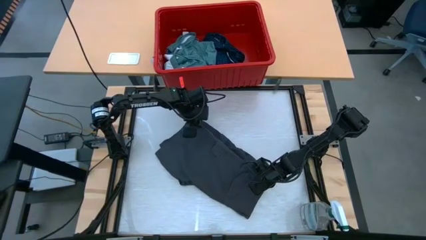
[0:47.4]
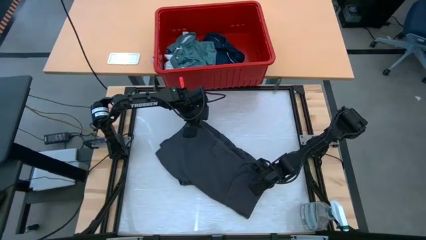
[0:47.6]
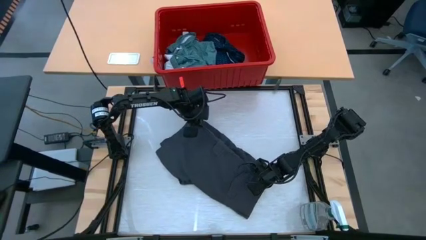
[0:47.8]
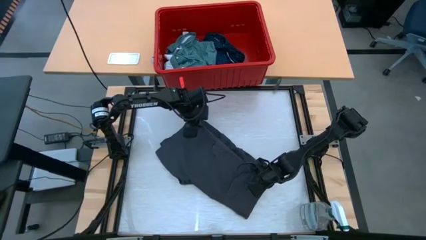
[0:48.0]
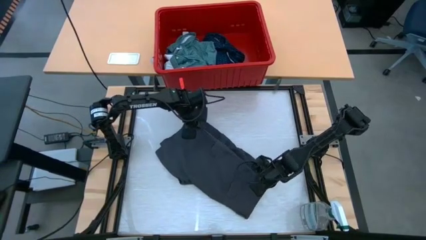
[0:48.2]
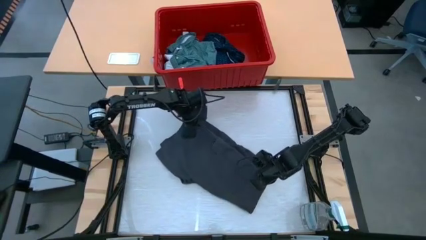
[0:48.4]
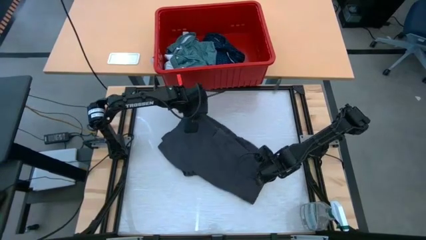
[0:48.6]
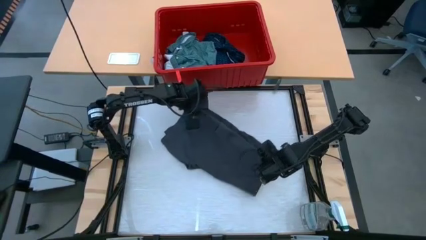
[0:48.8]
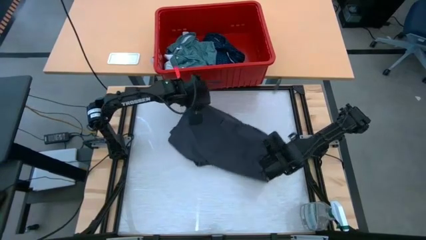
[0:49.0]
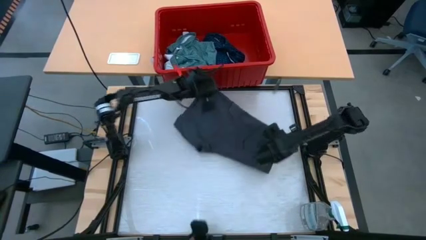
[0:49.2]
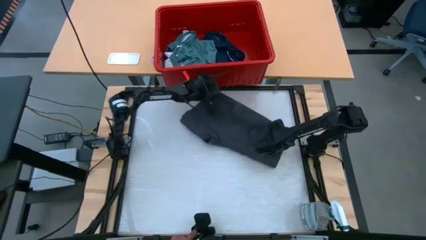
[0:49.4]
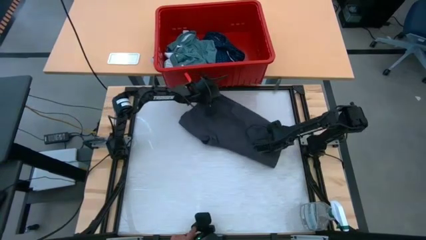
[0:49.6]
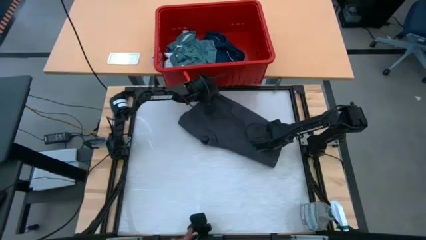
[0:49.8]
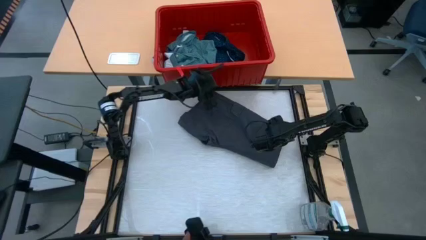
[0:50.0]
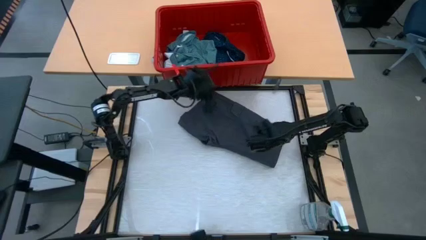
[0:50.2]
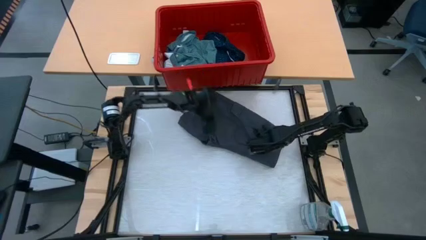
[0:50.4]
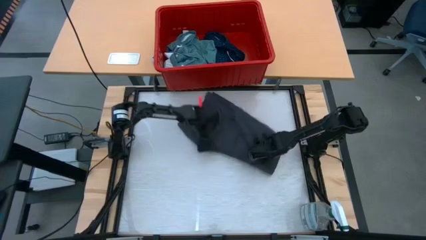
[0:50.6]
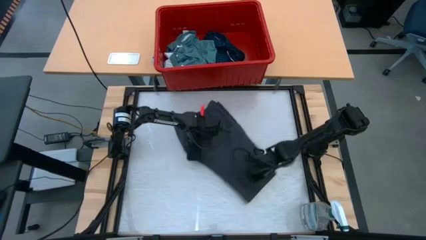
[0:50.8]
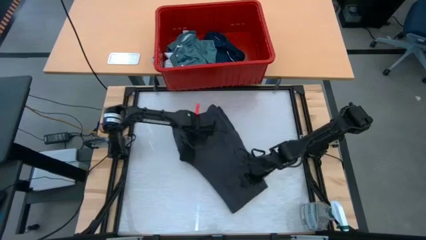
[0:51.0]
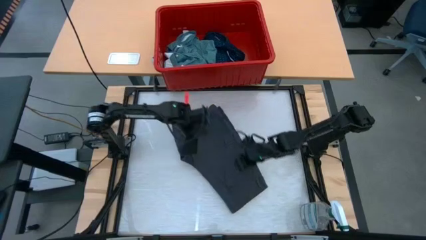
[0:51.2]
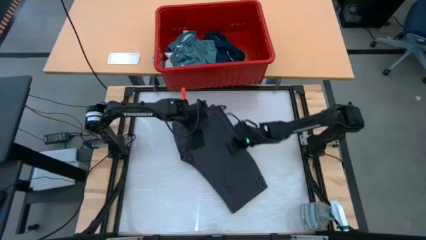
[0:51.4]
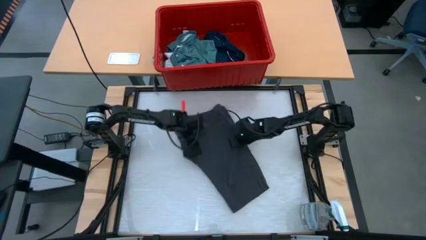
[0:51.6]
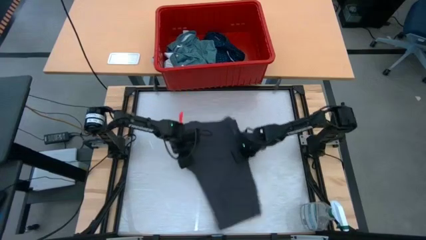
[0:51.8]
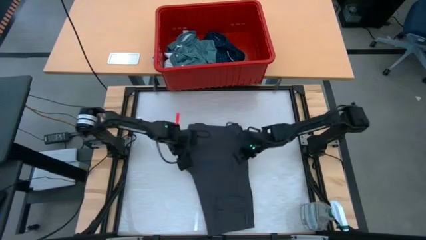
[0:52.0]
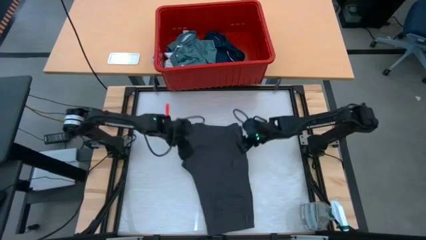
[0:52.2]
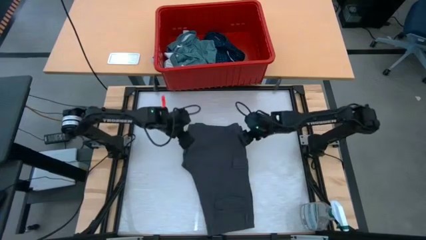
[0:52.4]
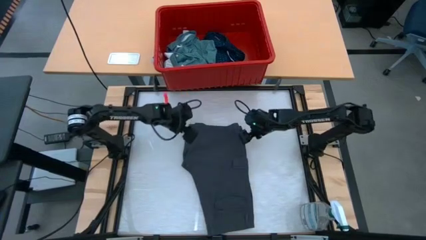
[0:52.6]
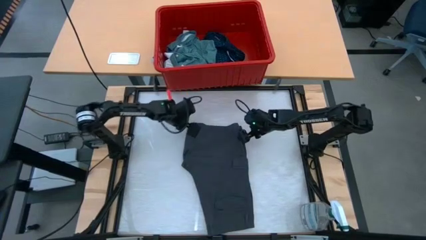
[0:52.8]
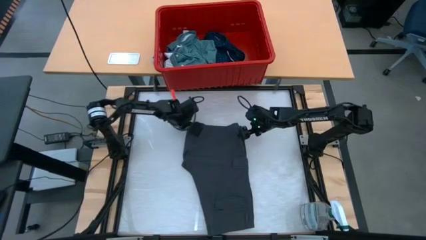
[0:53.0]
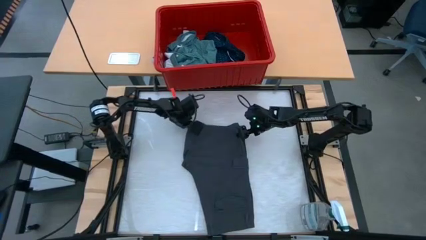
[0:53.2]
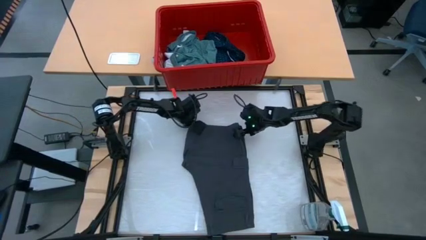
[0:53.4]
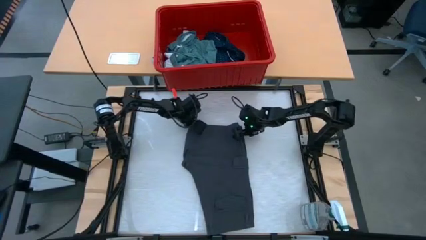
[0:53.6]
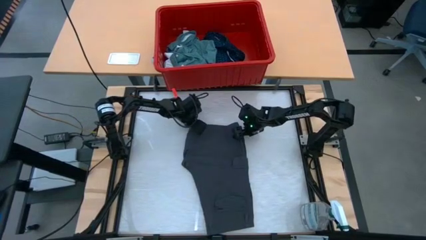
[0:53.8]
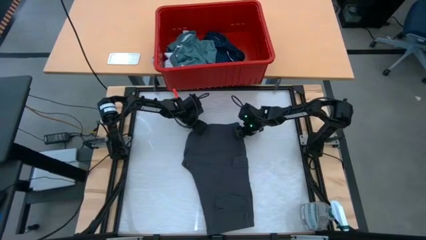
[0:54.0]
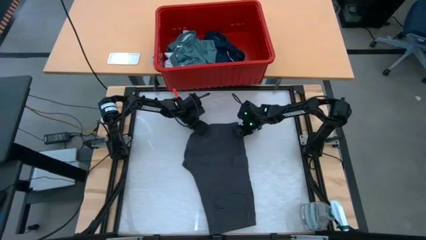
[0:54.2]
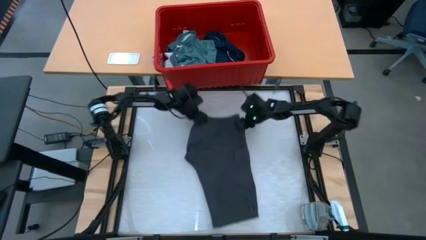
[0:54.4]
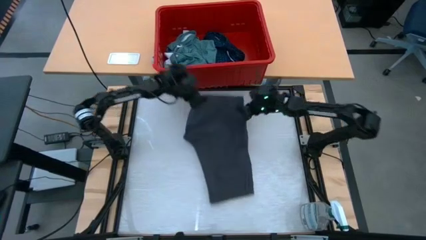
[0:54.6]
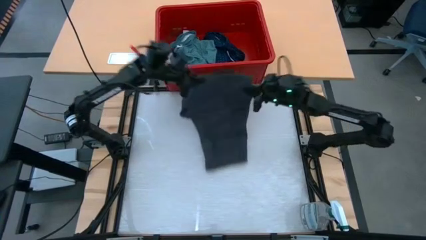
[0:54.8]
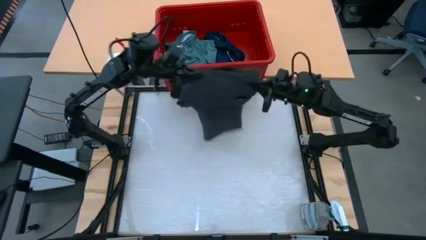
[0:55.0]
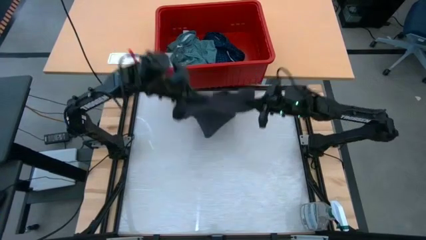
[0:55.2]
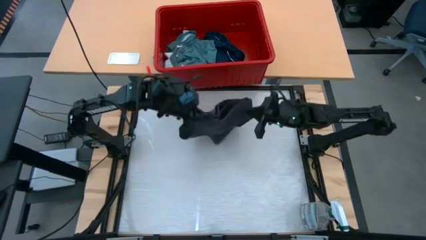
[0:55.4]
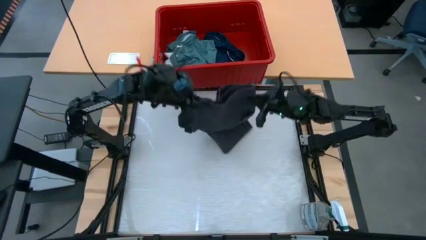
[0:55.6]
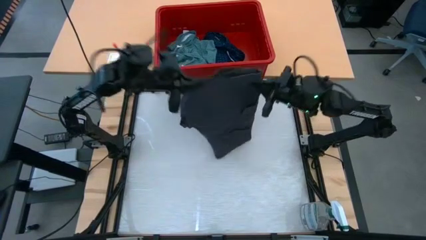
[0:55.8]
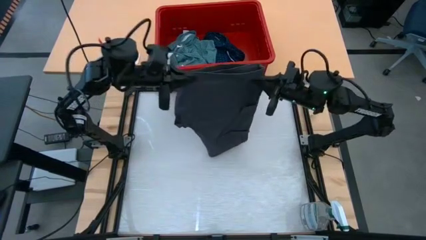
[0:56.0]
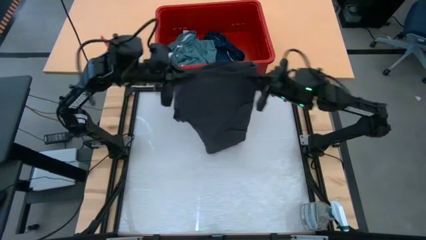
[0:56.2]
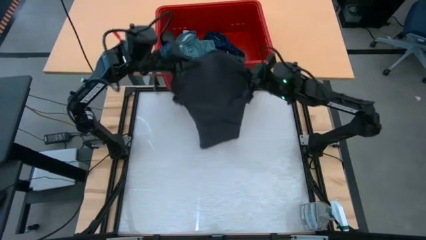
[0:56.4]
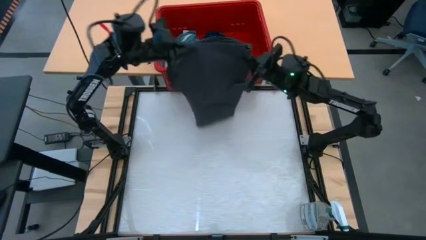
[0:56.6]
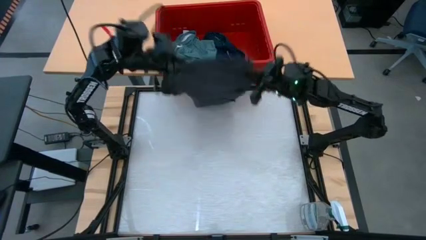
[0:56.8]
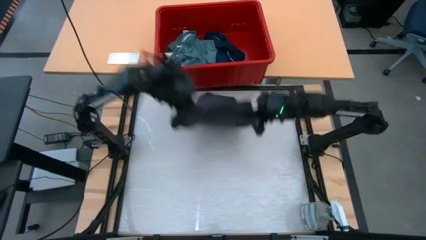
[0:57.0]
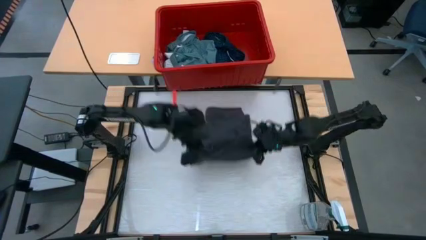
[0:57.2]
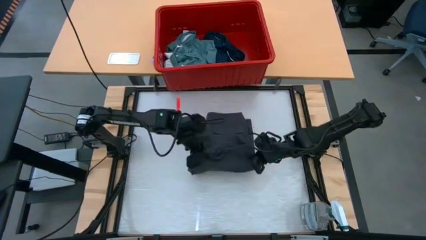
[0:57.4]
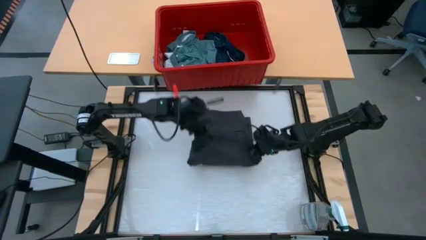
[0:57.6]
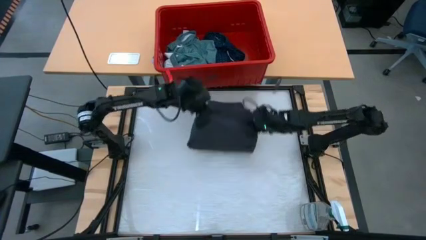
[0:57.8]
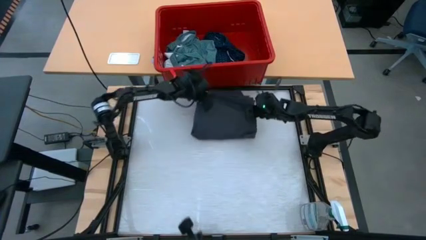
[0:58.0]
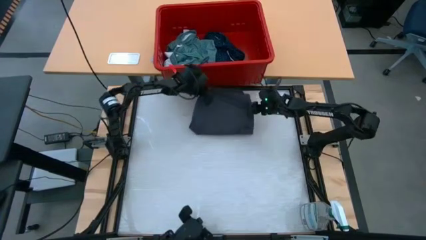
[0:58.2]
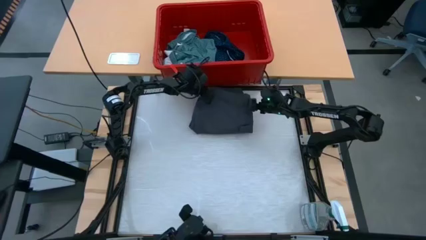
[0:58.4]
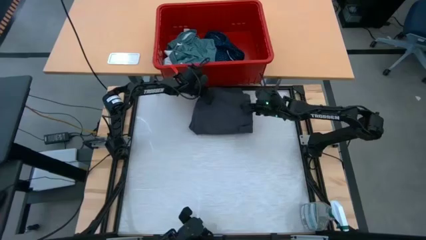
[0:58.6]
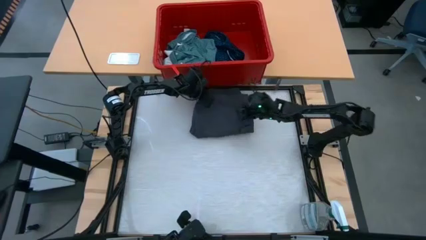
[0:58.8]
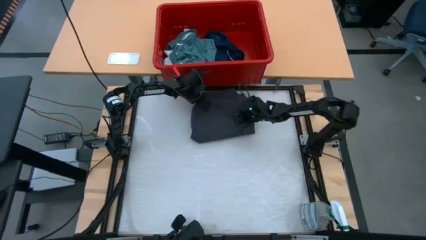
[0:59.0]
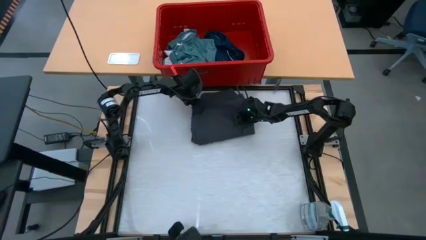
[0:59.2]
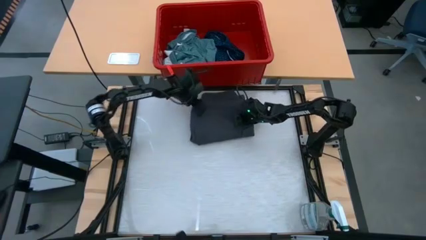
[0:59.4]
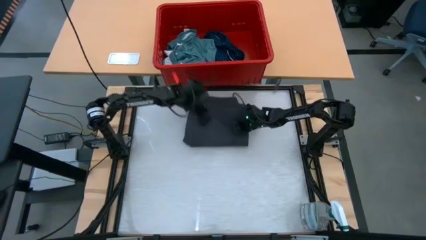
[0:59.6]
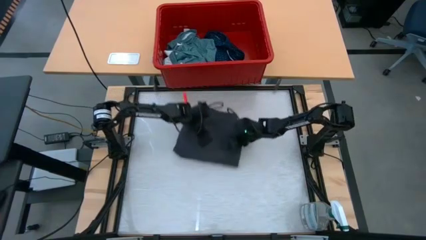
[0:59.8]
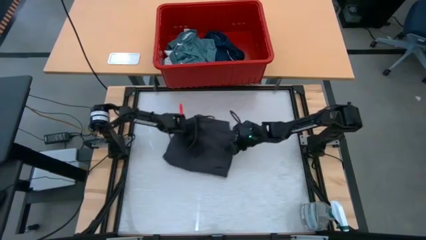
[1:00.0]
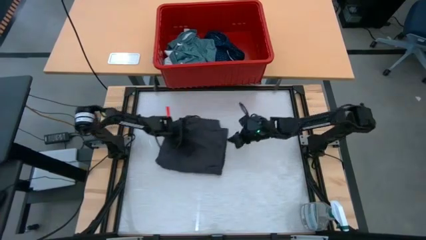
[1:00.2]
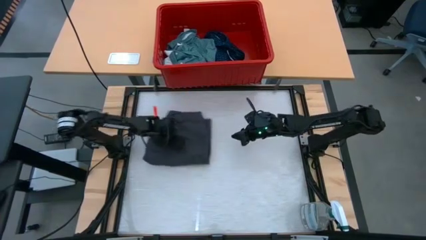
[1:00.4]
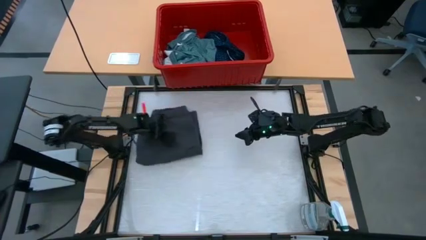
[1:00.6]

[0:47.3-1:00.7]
Task: Fold laundry
Fold the black pants

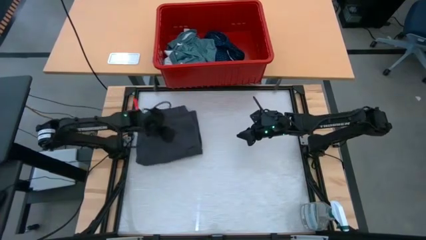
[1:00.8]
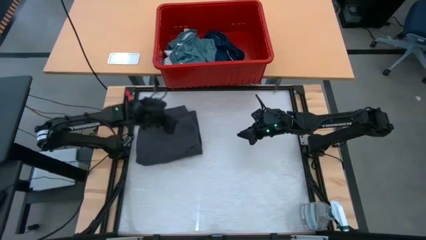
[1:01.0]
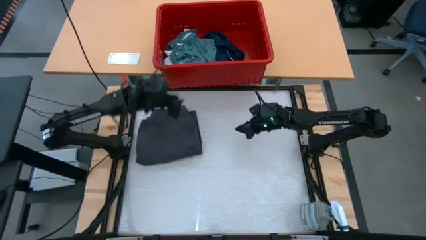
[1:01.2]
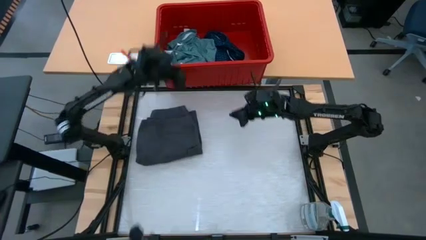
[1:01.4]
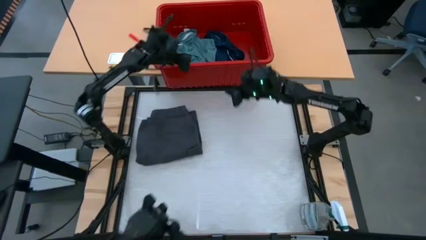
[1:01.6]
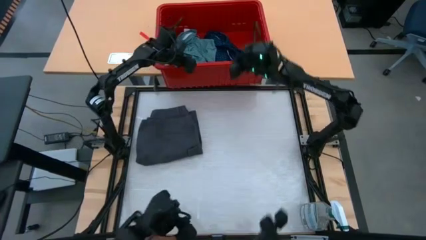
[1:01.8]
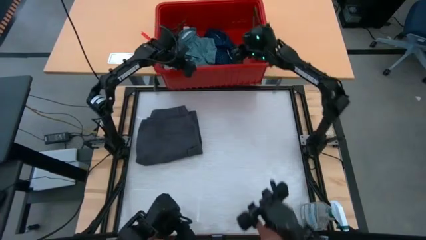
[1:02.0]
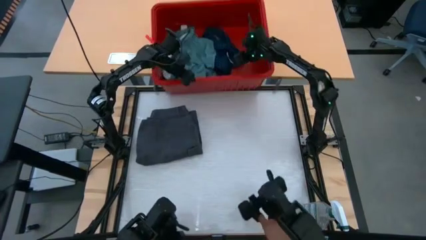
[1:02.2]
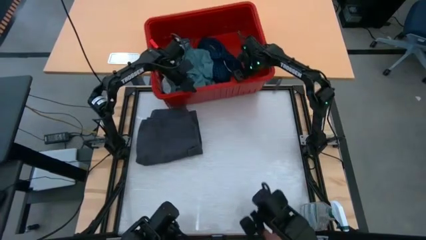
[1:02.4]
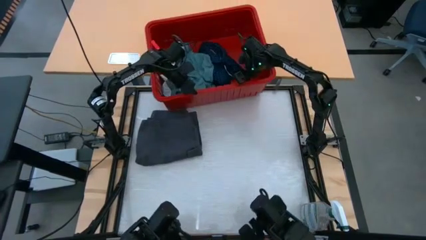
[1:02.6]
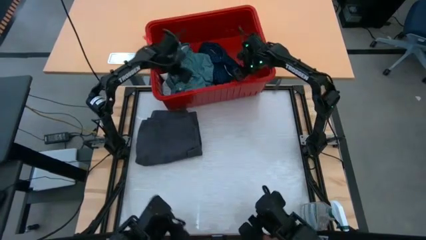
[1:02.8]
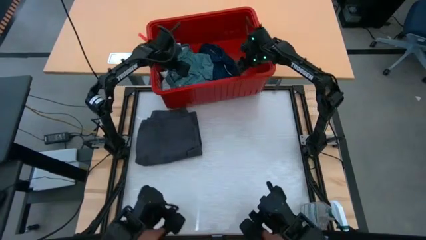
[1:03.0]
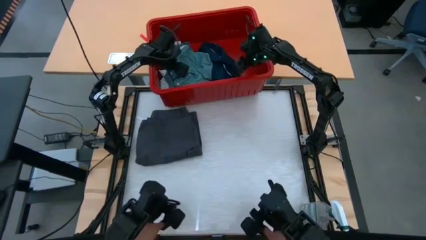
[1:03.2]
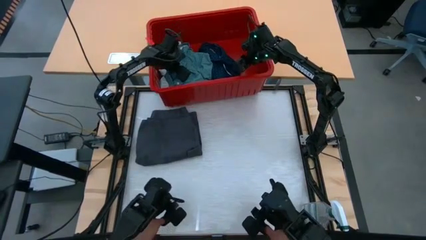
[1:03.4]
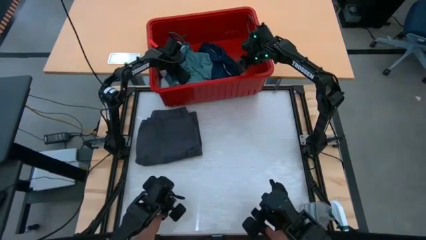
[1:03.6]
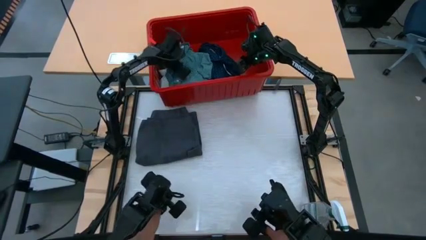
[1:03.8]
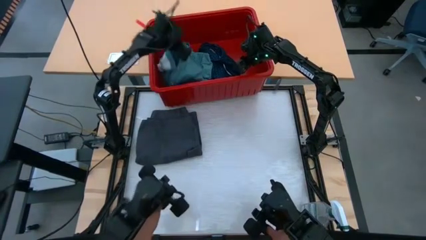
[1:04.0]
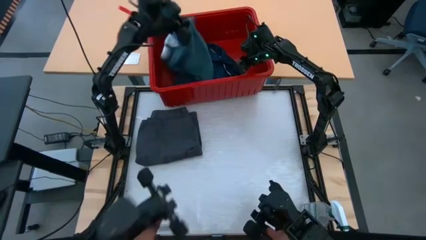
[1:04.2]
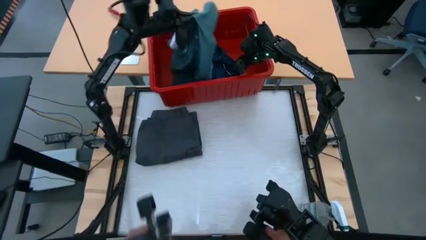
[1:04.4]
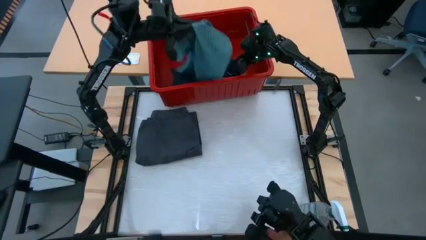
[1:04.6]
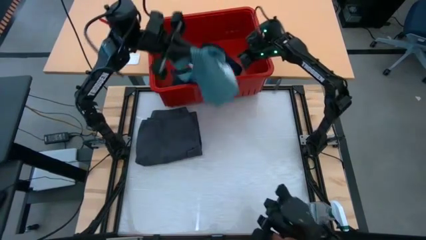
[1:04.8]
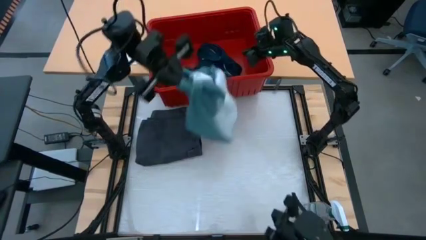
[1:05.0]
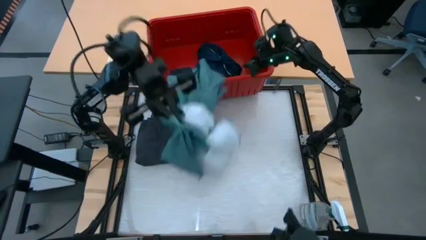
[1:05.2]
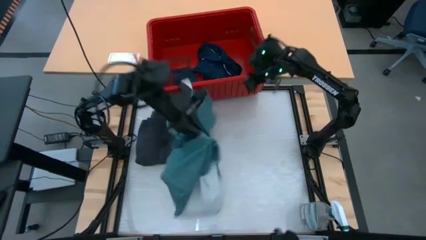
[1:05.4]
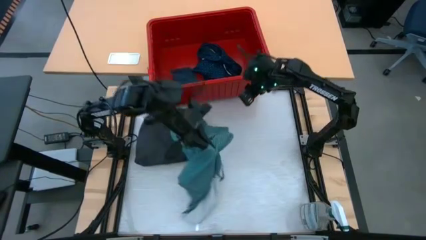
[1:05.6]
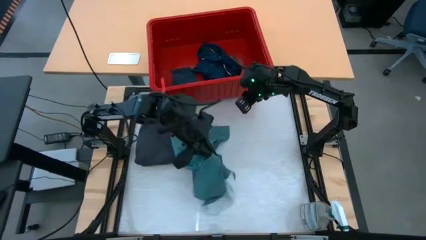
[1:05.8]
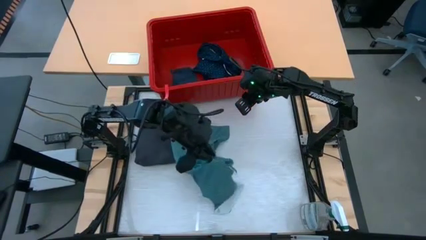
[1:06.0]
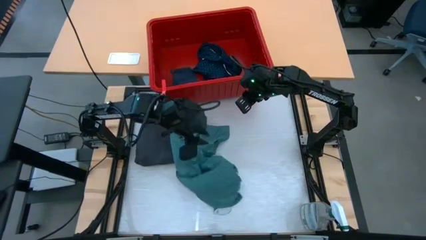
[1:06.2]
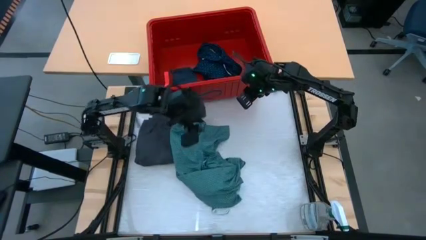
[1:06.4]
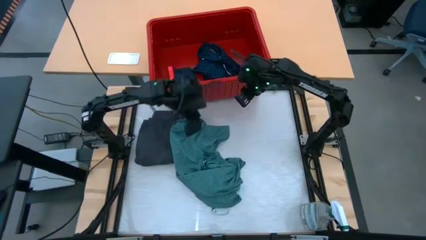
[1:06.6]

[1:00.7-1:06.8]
Remove the dark green polo from the red bin
